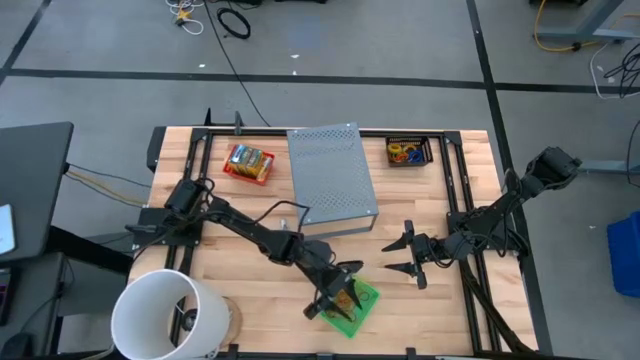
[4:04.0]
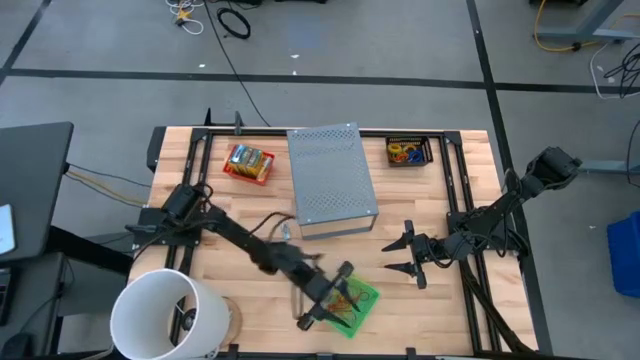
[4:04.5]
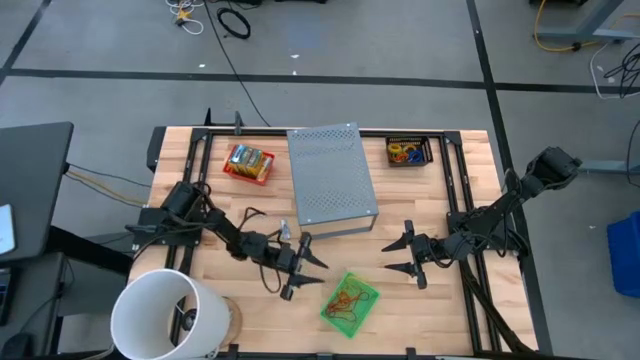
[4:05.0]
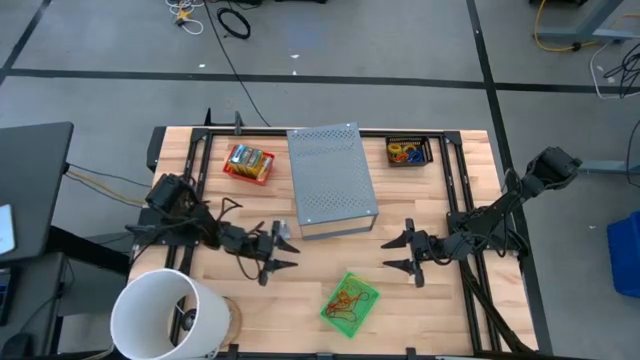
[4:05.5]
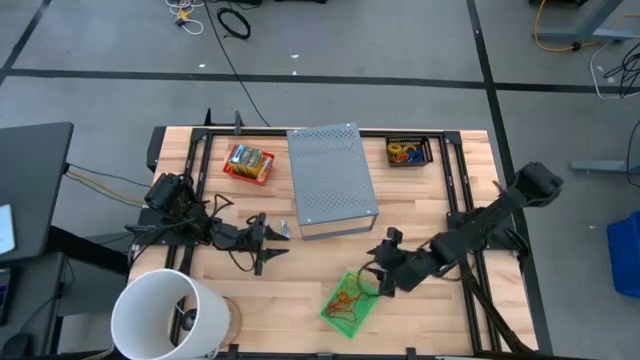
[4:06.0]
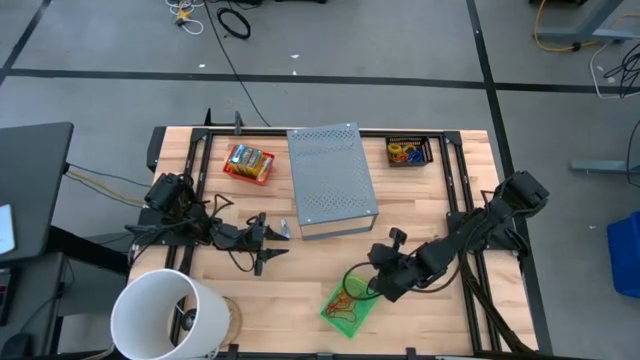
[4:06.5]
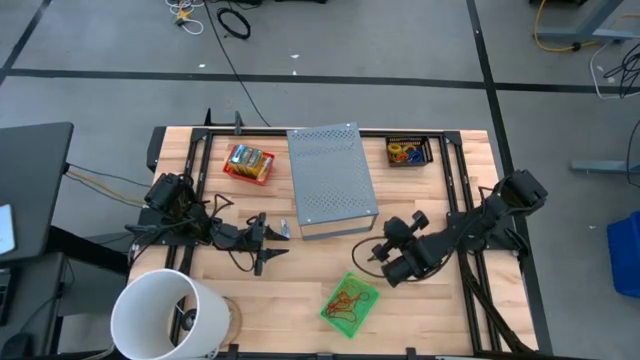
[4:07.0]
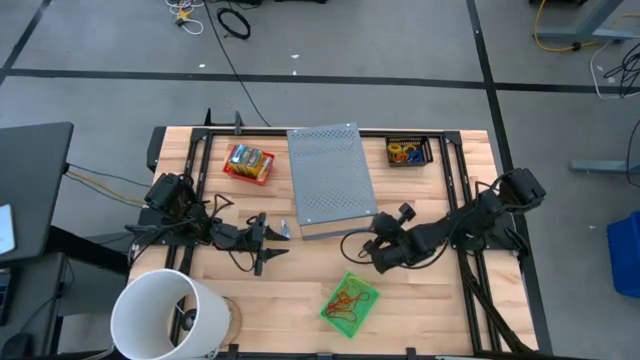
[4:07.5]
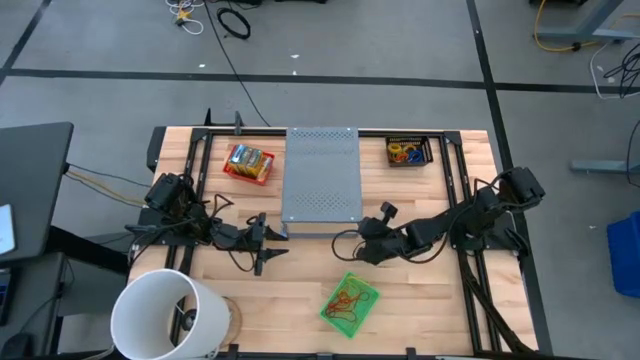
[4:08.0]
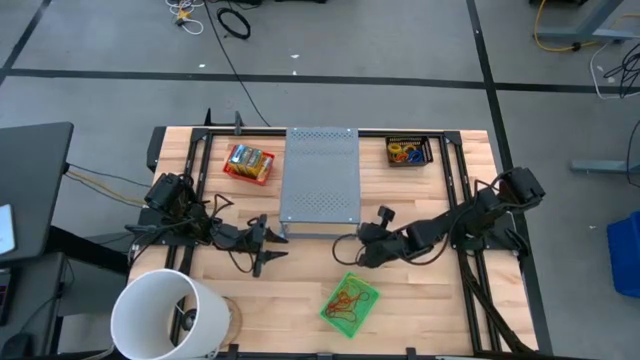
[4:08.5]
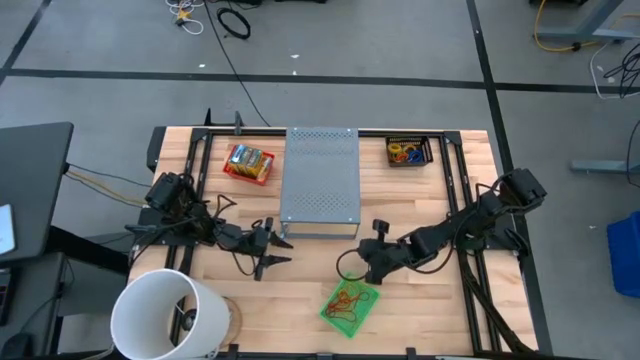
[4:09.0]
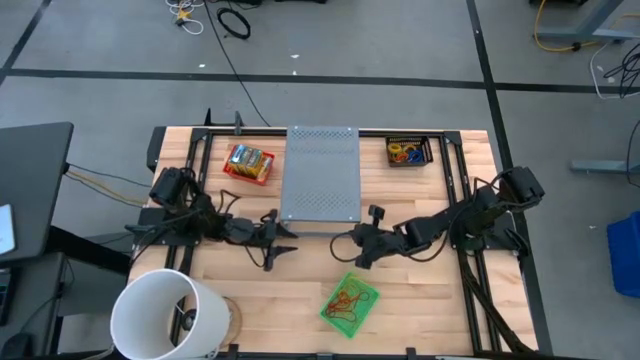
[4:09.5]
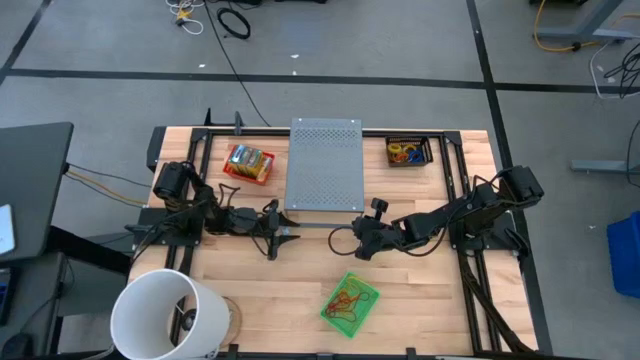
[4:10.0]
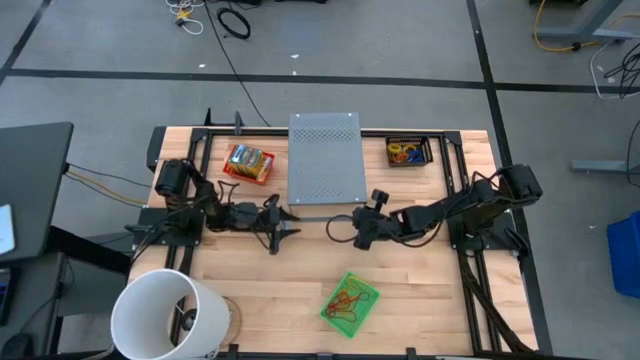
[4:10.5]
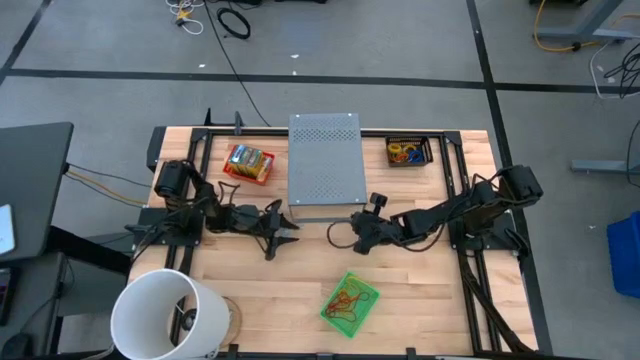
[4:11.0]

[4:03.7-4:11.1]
Task: Pick & Place Office Desk Supplies
Adjust the shelf on the table

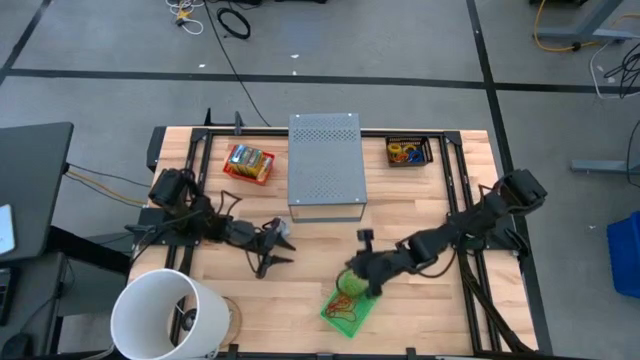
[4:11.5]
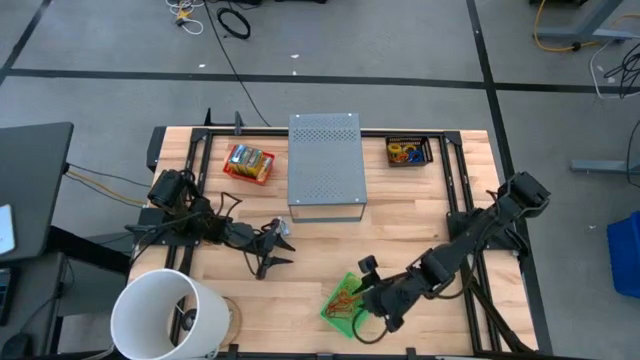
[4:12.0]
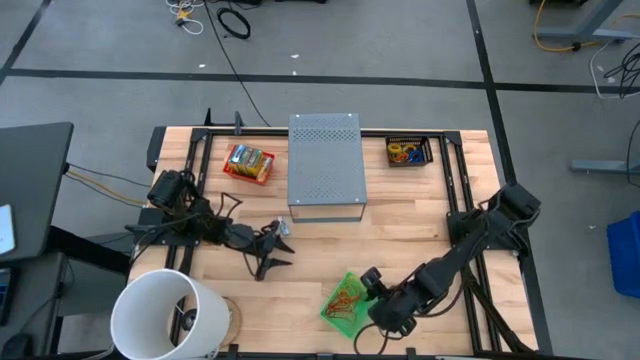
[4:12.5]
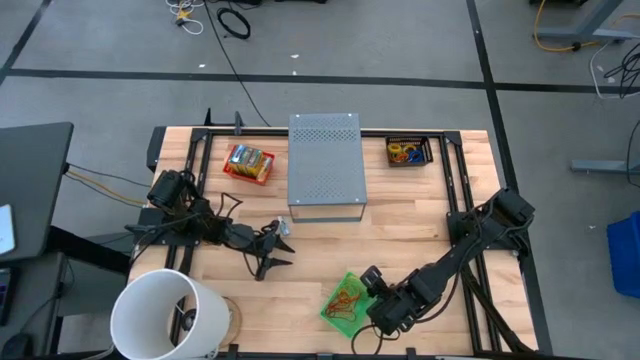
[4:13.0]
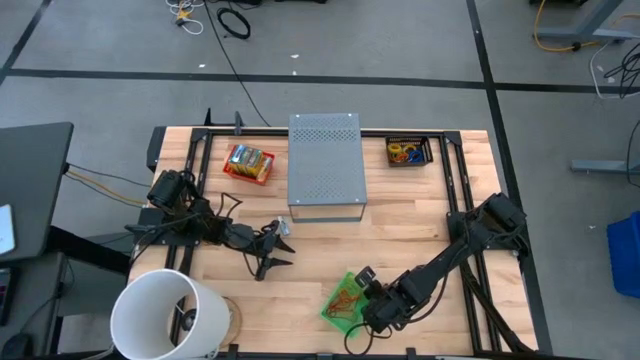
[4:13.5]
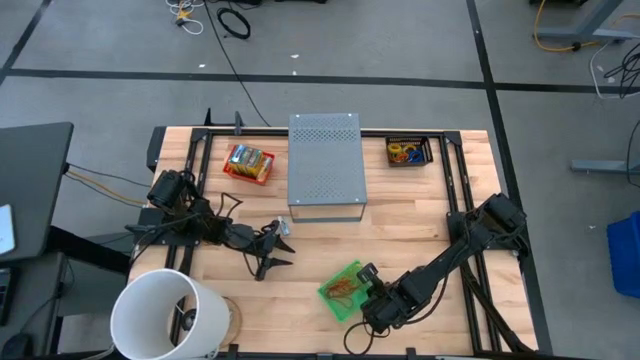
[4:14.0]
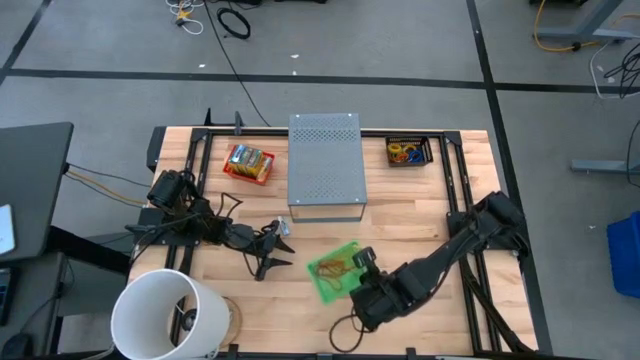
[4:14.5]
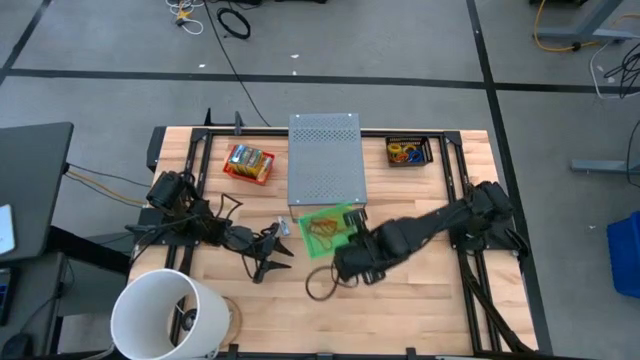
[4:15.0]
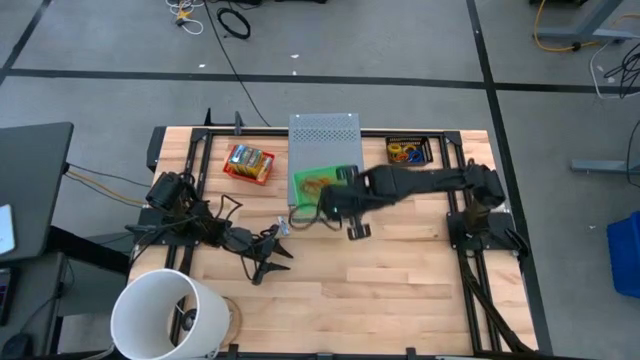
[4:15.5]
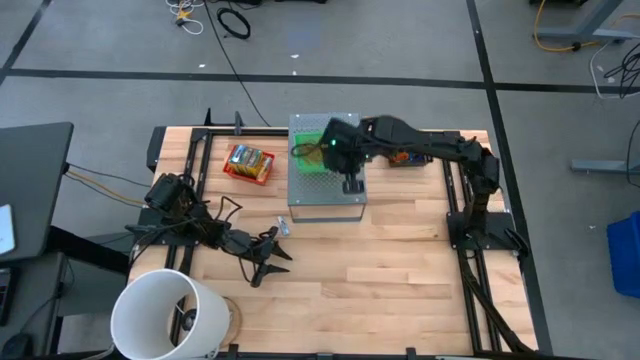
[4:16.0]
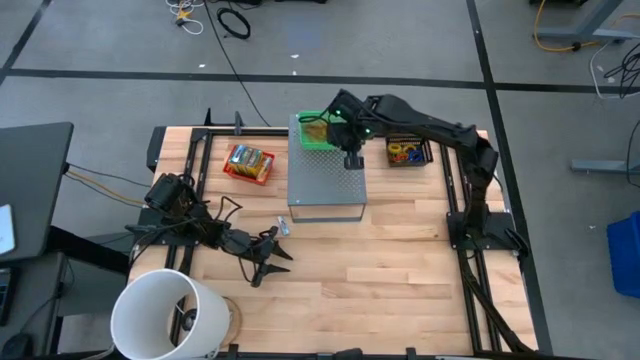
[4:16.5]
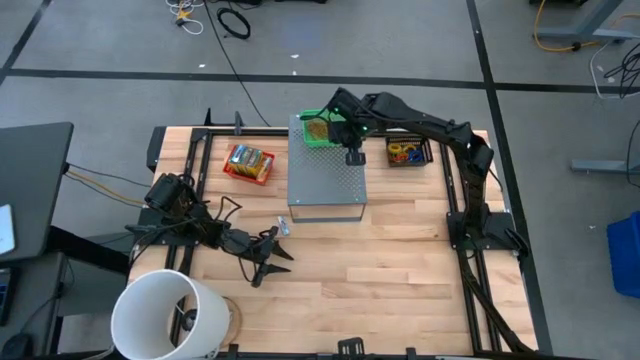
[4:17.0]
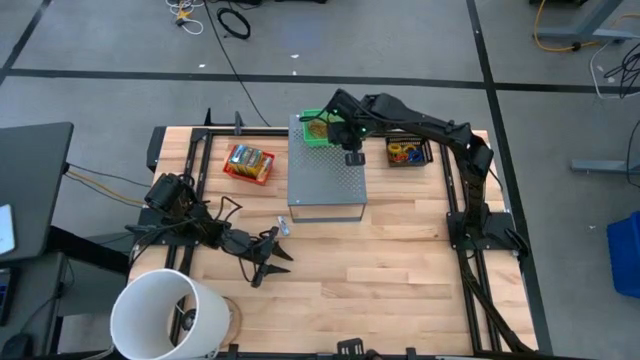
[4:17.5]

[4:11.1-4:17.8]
Put the green basket on the shelf

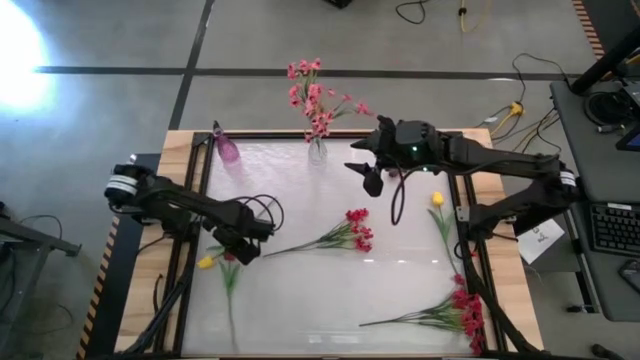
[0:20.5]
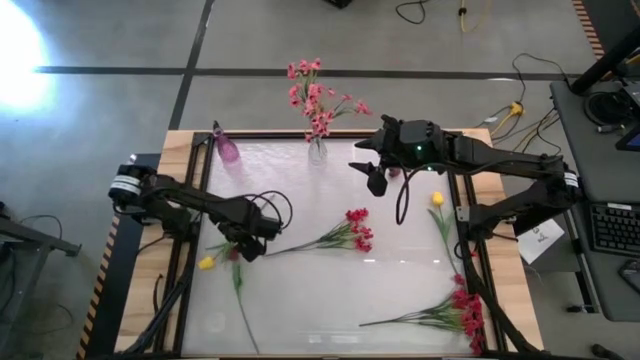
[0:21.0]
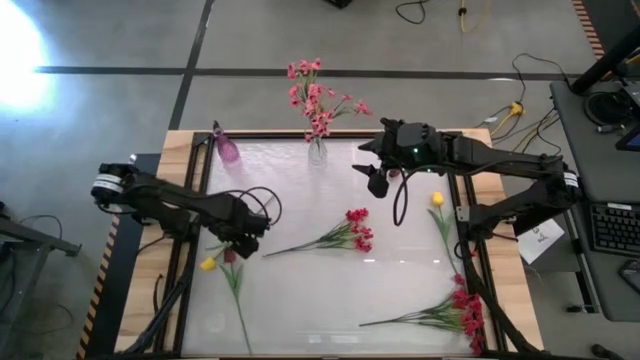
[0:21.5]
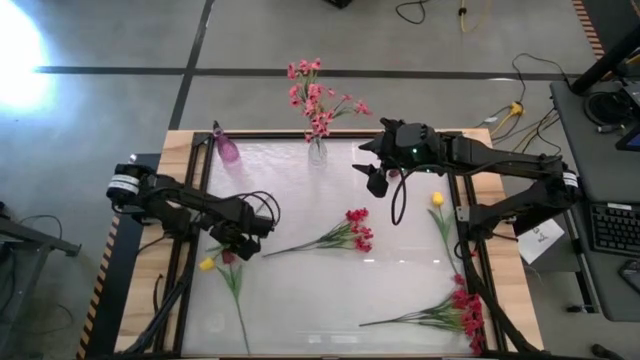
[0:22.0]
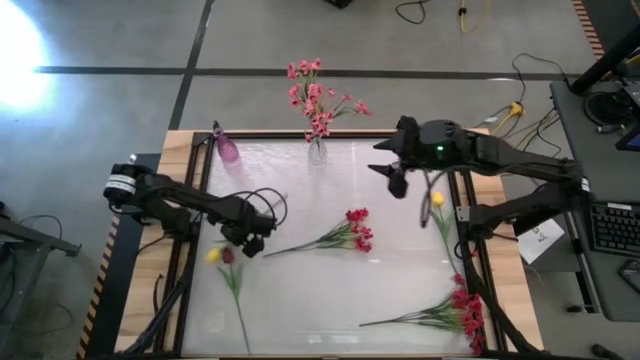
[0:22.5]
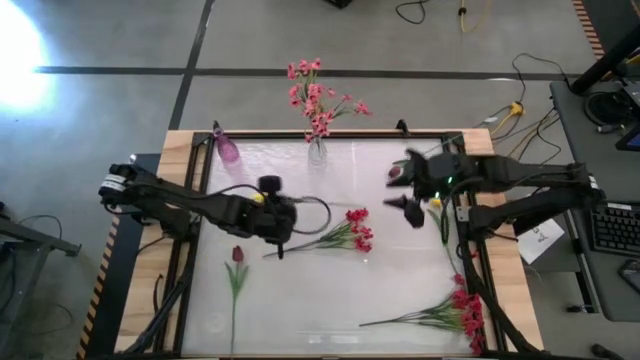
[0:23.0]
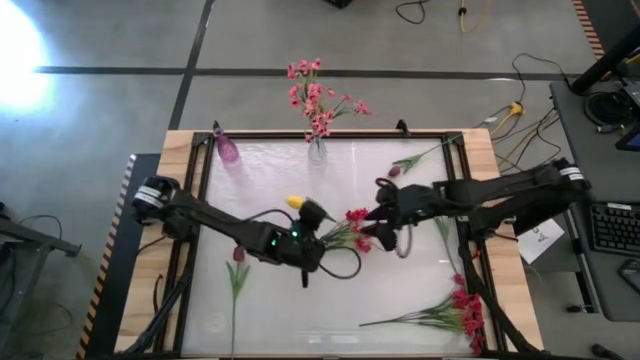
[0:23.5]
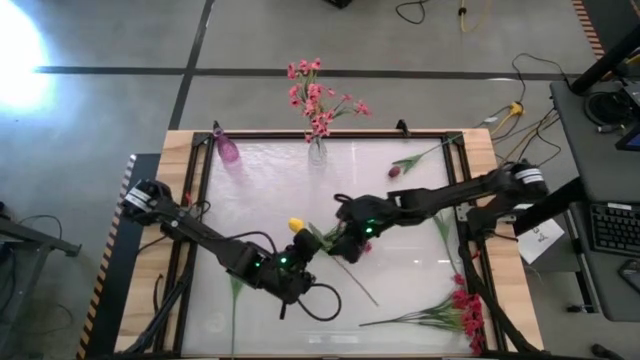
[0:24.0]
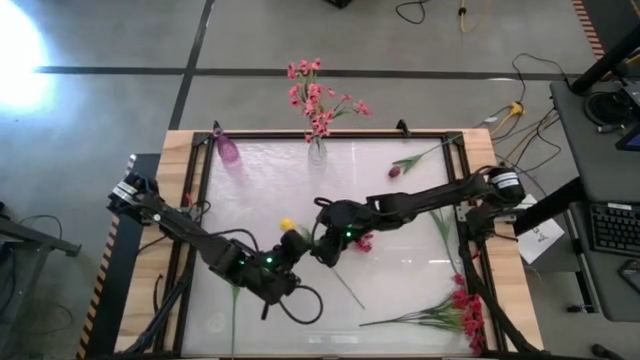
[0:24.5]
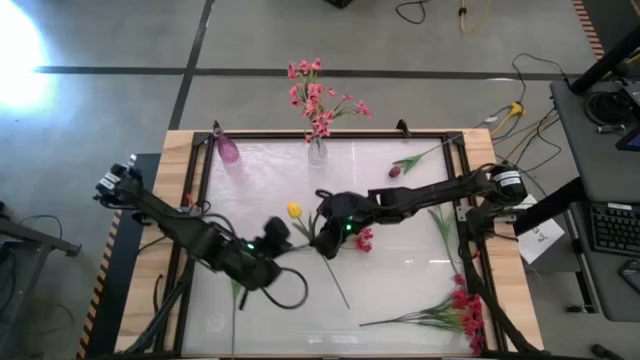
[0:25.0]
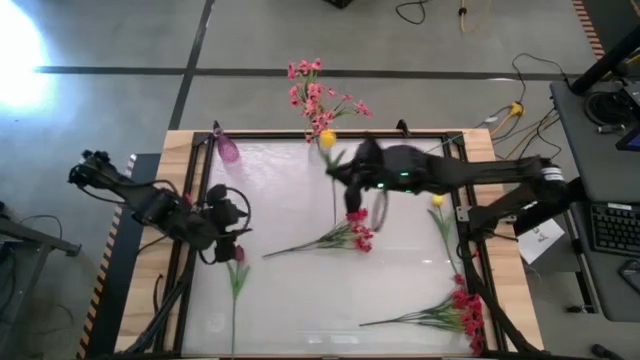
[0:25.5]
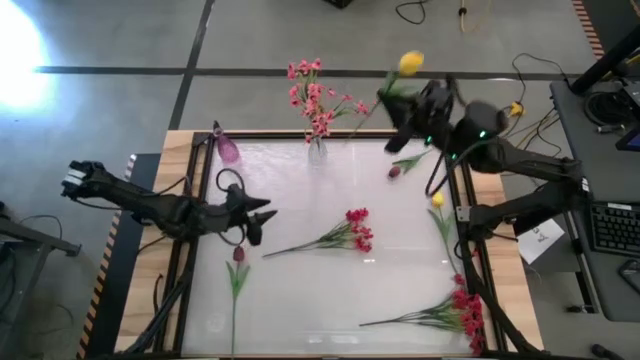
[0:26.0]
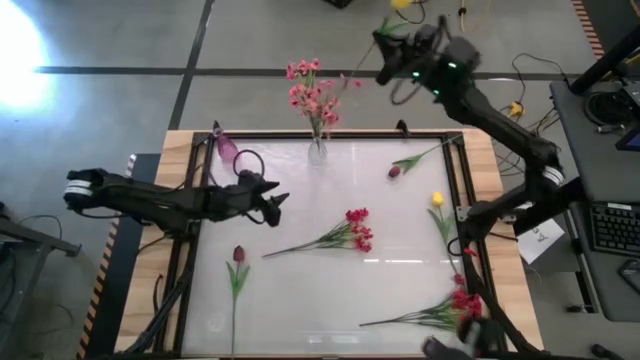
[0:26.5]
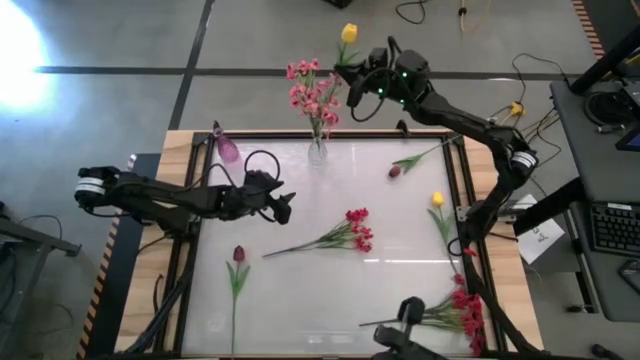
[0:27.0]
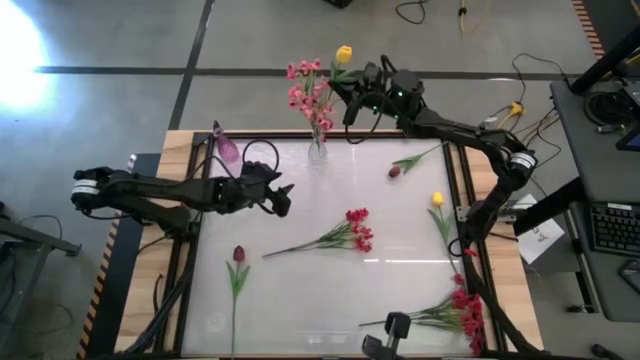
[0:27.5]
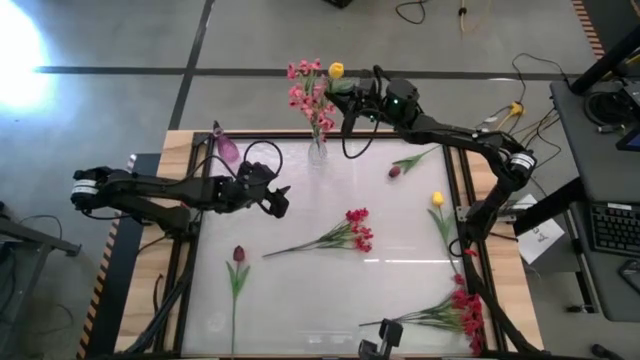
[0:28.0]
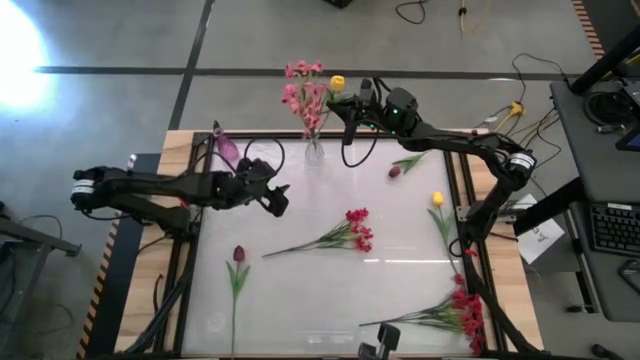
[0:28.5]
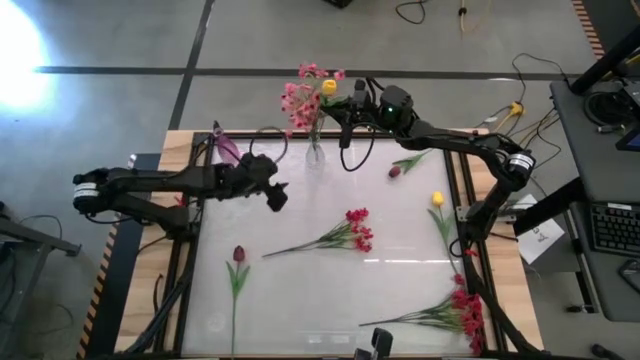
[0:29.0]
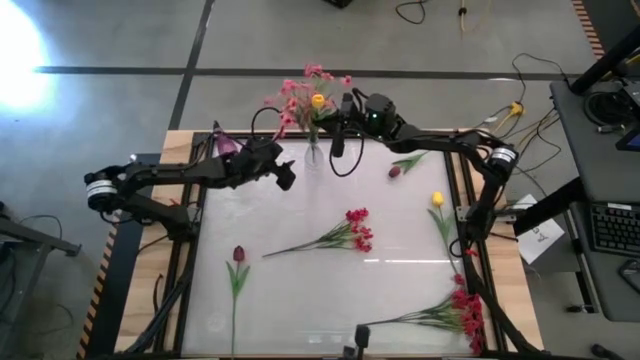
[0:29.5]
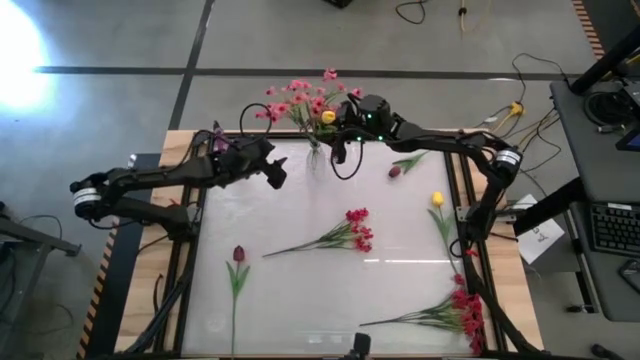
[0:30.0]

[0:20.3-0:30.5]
Task: Sort flowers into vase by color
Put the left yellow tulip into the transparent vase
